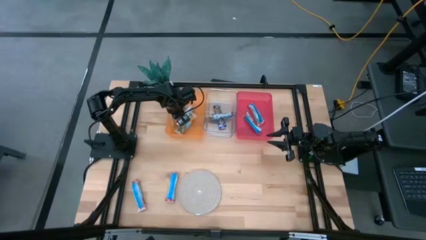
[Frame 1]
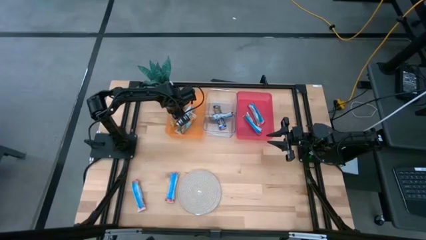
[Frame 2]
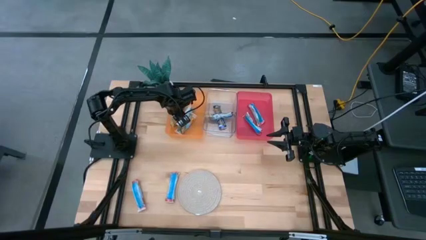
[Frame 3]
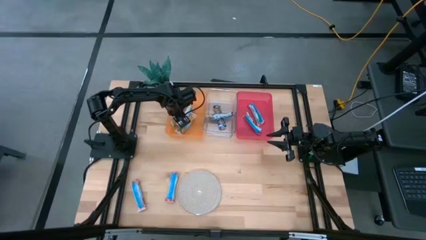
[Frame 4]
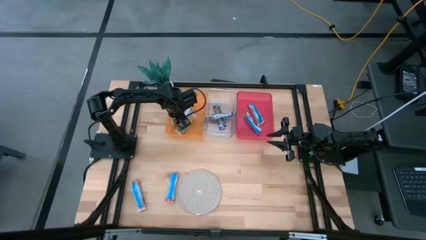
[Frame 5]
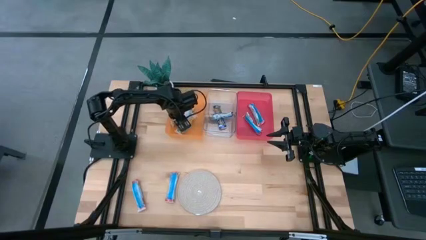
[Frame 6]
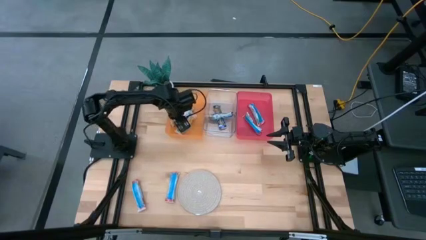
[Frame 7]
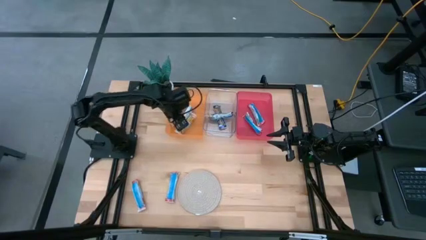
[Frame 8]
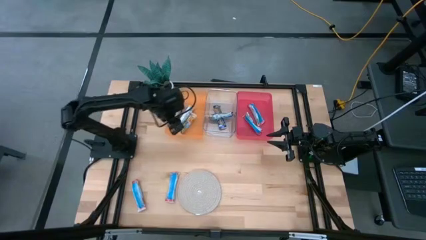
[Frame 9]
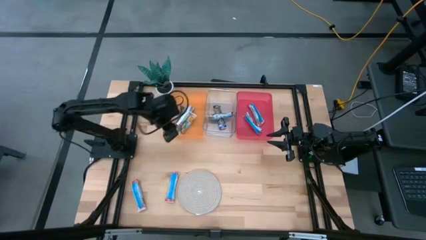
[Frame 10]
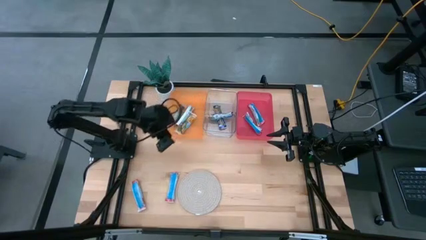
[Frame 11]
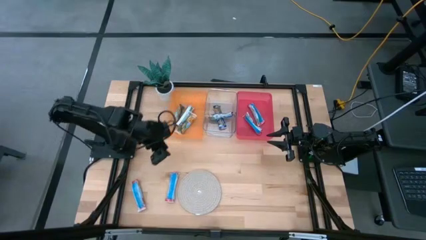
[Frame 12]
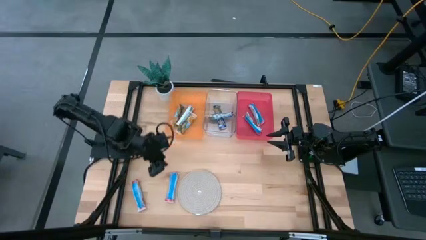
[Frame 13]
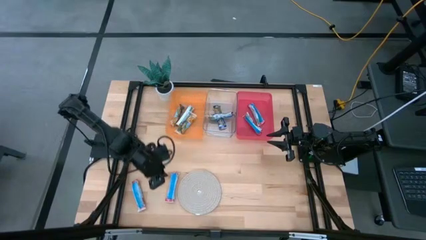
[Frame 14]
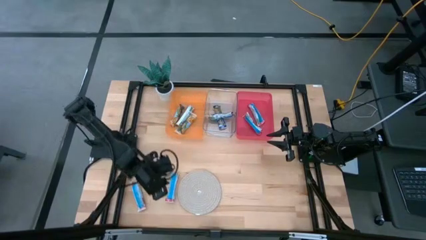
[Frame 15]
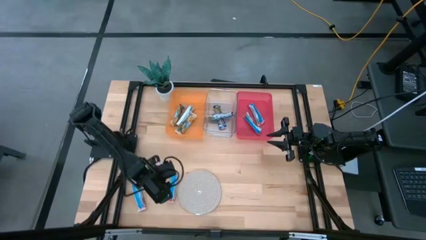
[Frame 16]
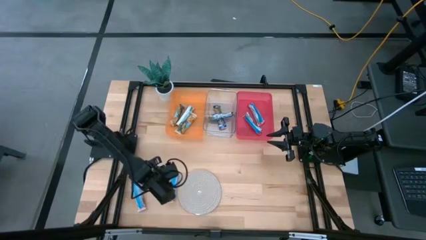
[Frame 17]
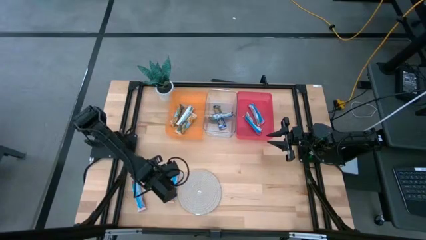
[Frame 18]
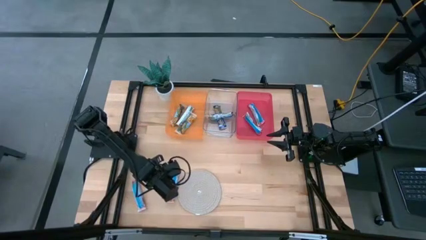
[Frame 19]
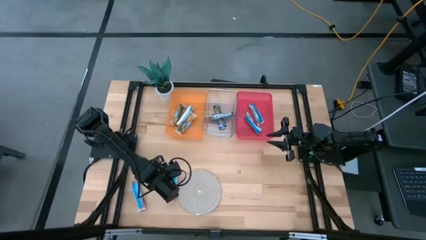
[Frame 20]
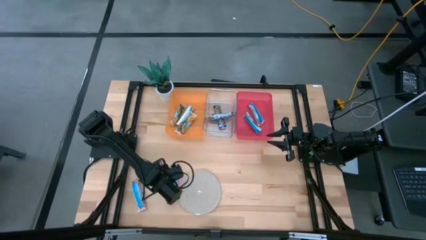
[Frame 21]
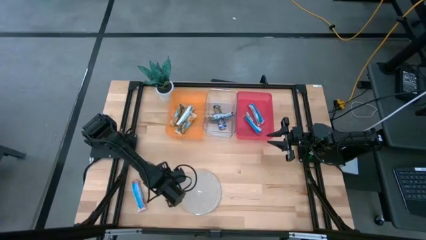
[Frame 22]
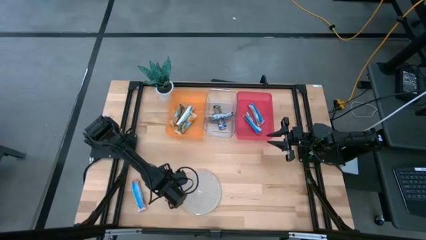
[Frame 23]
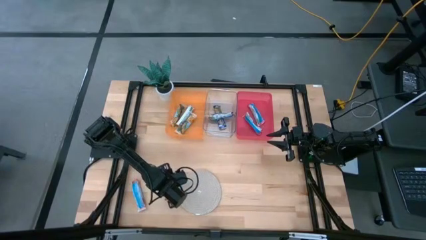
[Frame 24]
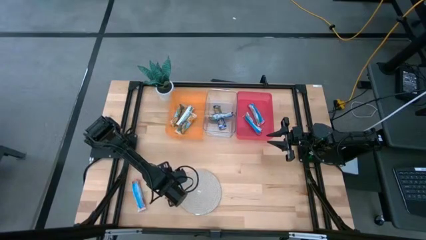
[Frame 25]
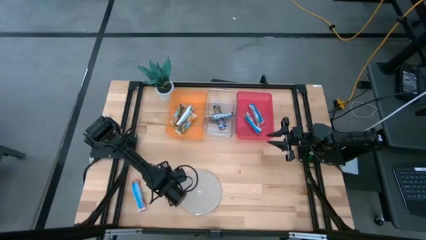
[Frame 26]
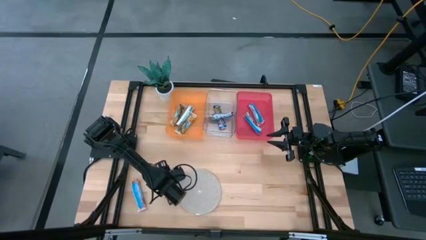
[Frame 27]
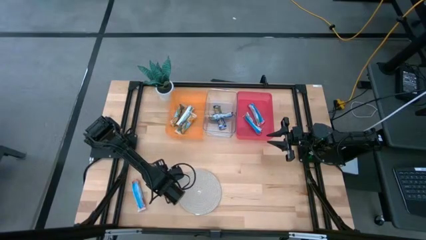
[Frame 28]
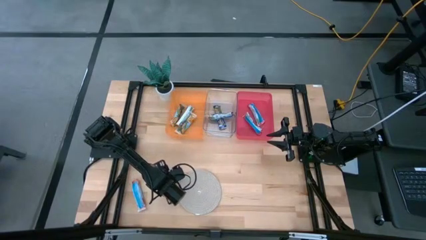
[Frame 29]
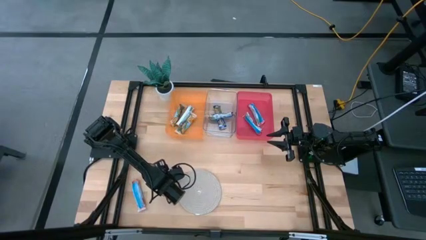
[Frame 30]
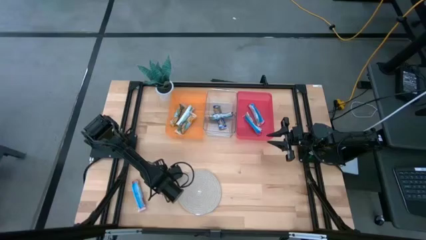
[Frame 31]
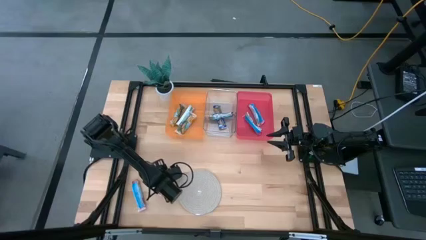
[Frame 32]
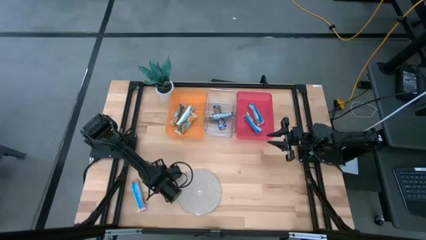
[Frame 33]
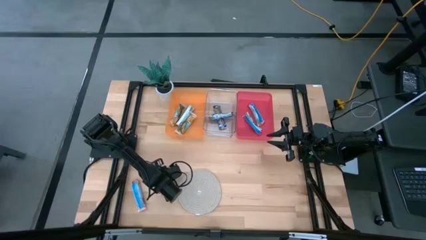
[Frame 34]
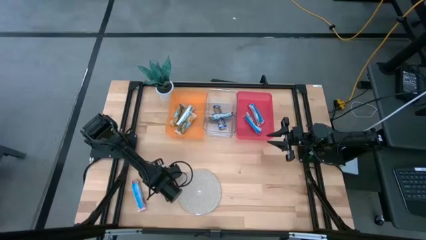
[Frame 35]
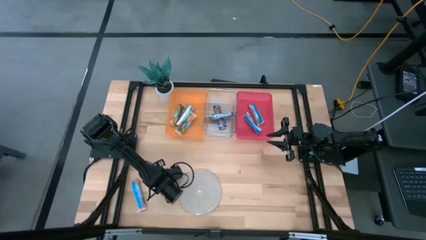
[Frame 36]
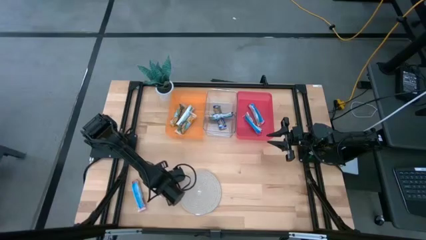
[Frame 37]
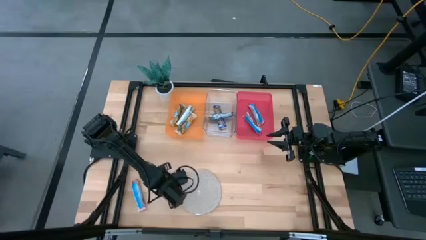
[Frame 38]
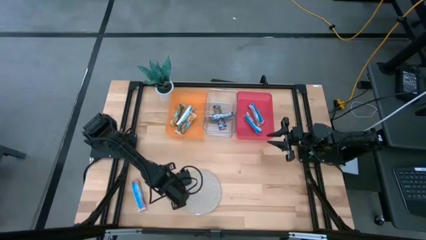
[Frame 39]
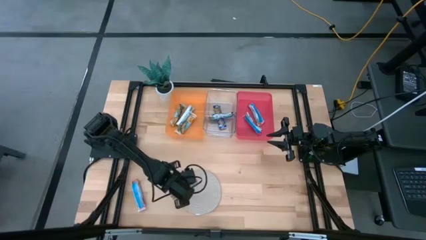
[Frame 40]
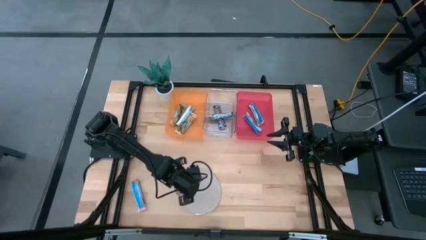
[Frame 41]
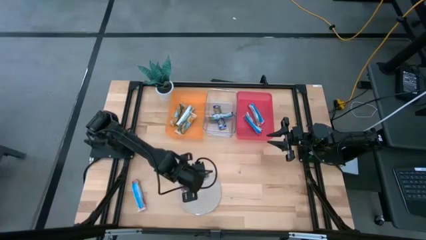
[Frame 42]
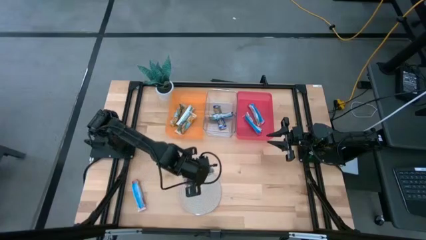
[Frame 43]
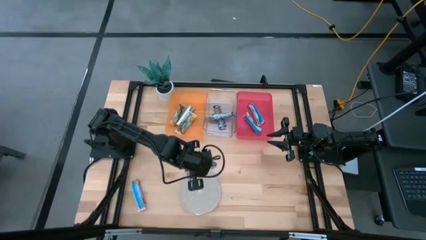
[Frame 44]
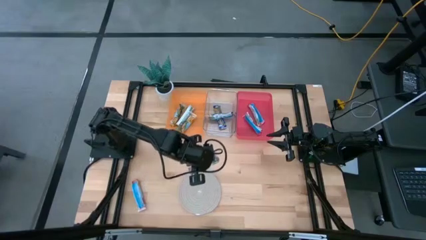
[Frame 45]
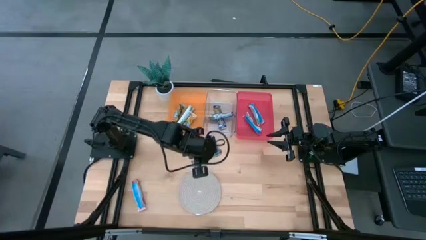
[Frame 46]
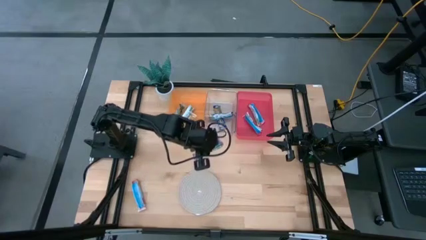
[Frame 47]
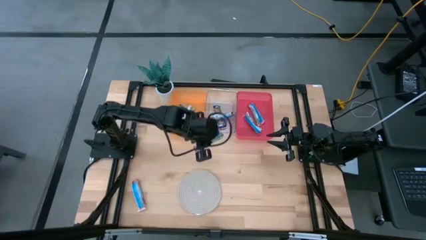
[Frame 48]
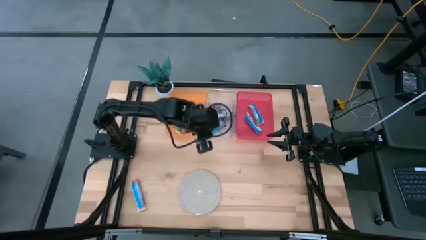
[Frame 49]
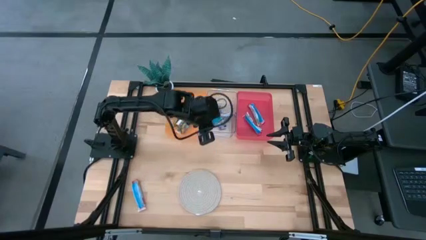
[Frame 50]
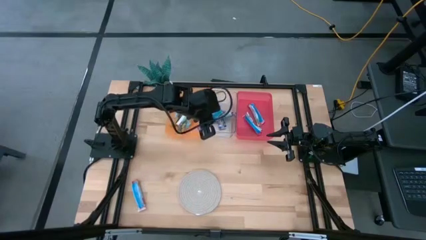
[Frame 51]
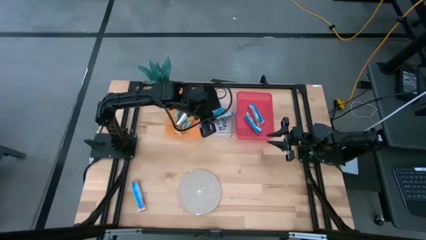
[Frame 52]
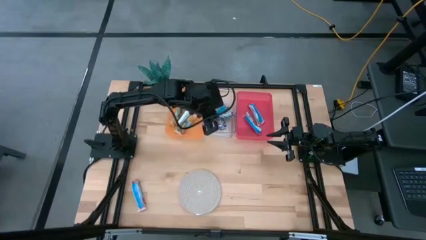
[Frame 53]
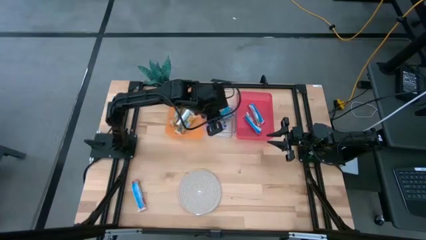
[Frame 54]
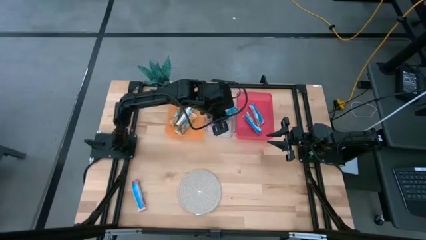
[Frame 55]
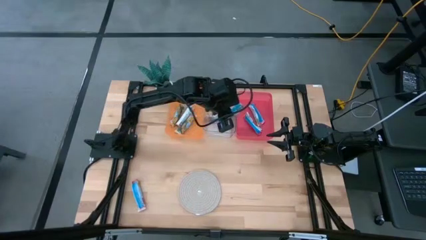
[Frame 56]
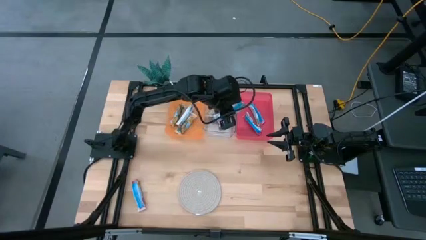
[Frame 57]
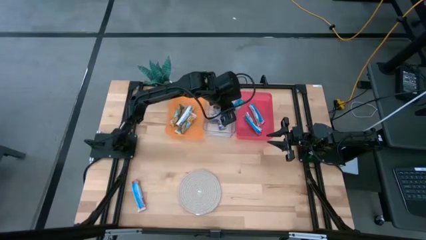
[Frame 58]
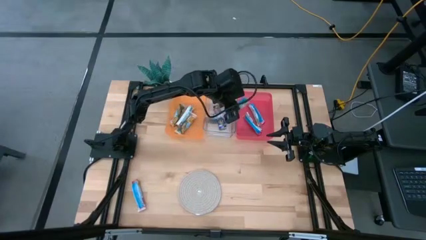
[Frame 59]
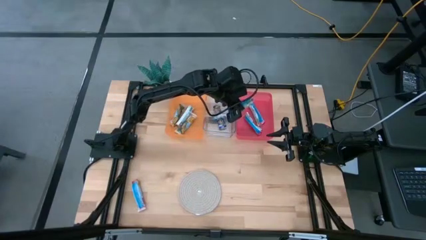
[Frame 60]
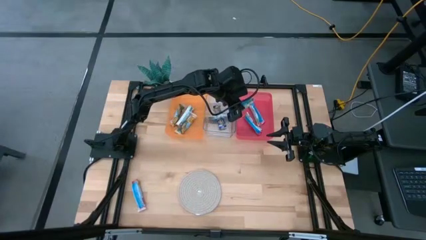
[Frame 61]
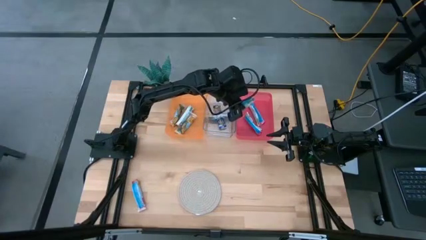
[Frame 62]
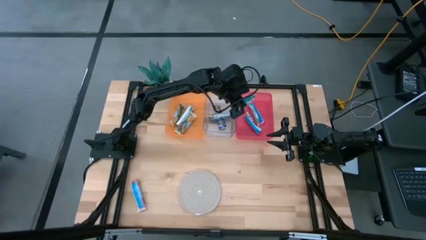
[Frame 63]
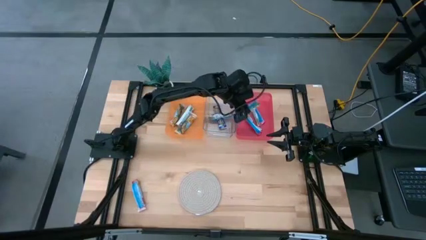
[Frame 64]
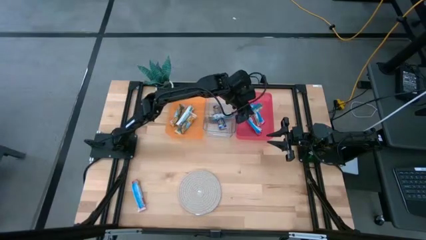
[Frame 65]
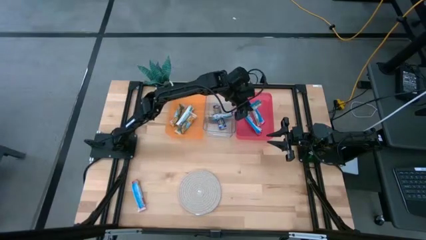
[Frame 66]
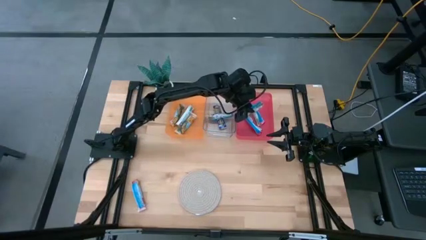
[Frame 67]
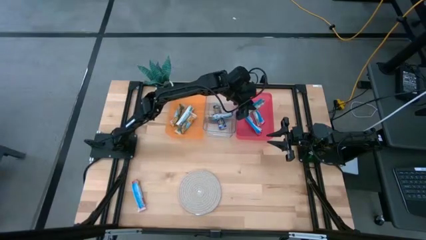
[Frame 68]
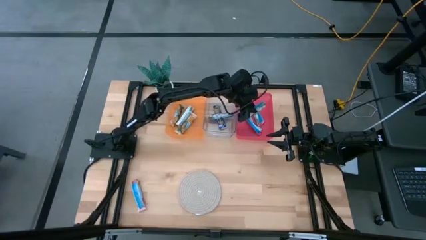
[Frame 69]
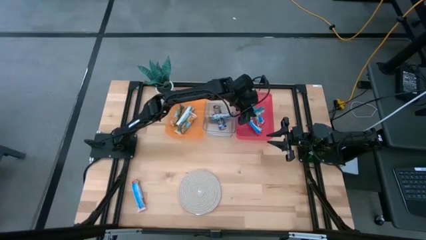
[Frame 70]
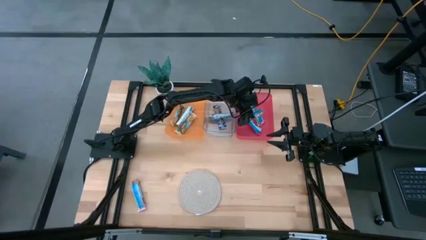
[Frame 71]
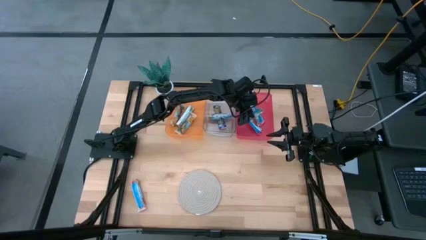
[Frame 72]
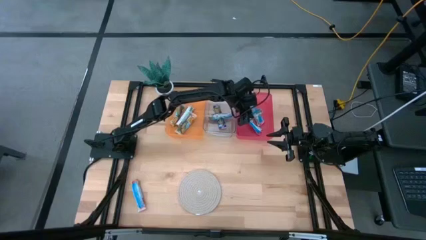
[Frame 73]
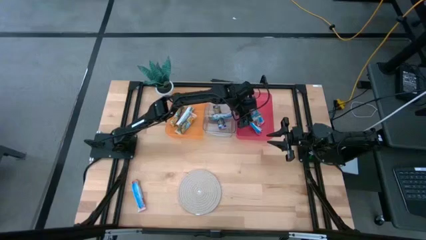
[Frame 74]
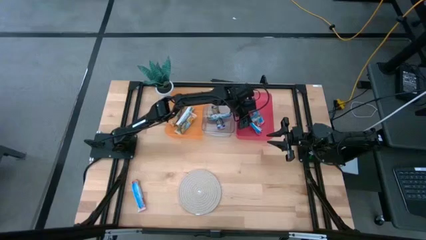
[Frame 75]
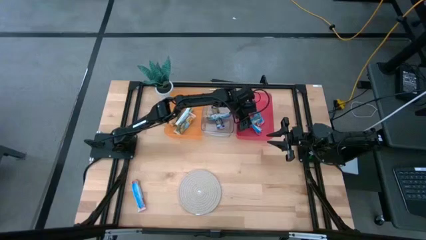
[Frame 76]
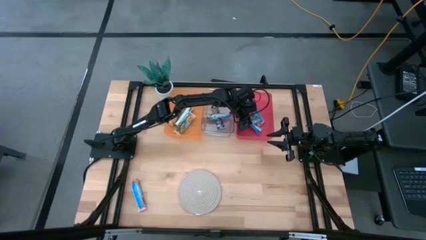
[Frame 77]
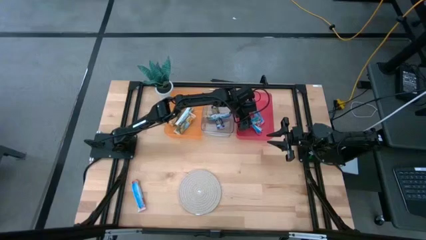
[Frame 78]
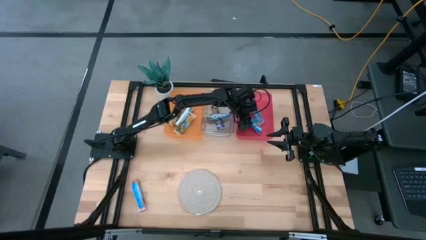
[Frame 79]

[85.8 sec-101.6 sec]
Task: Pick and place Granola Bars by type
Put the right red granola bar into the pink bin
